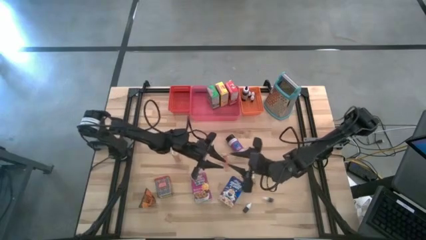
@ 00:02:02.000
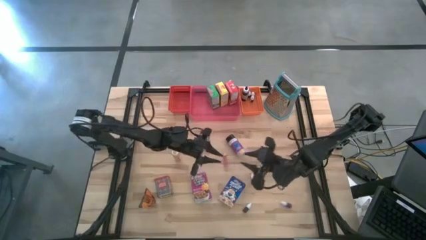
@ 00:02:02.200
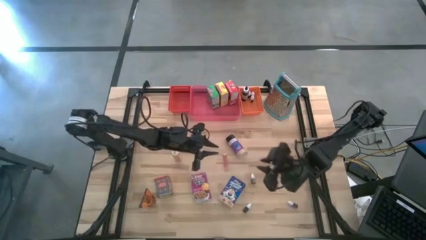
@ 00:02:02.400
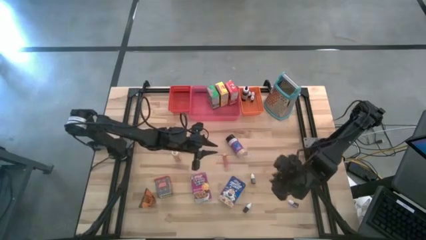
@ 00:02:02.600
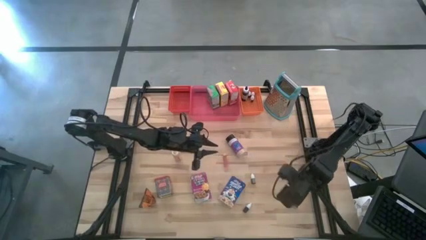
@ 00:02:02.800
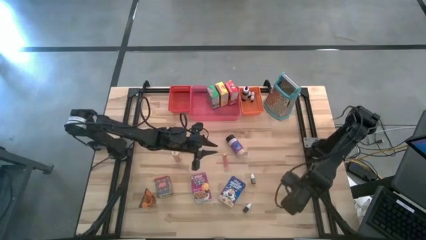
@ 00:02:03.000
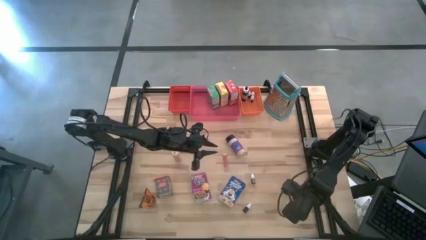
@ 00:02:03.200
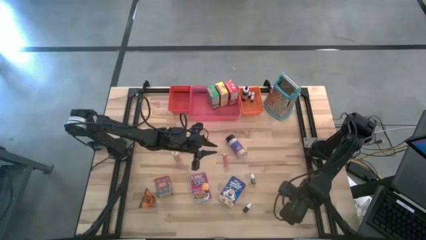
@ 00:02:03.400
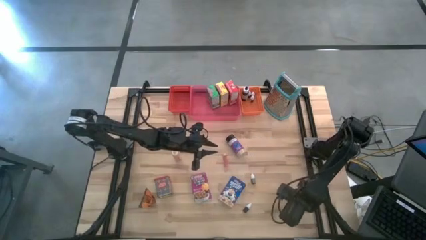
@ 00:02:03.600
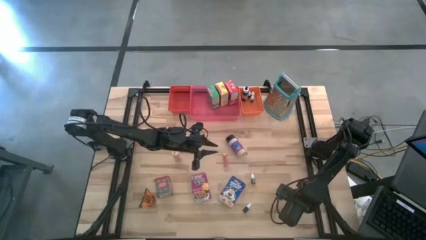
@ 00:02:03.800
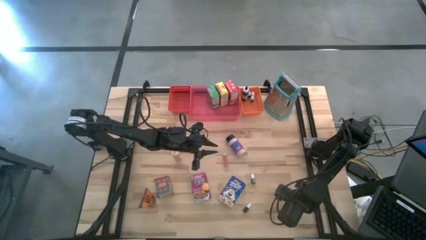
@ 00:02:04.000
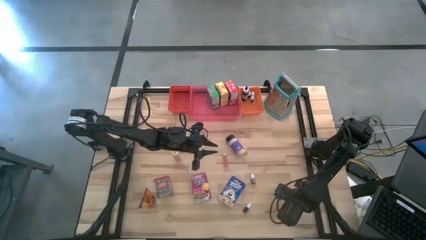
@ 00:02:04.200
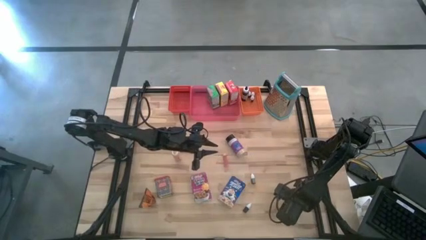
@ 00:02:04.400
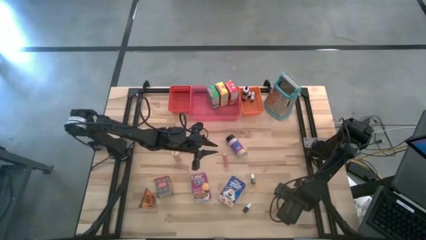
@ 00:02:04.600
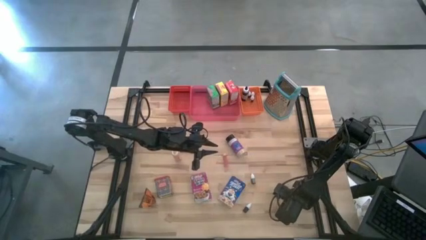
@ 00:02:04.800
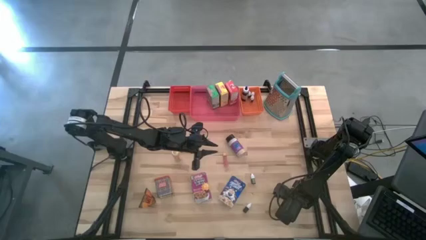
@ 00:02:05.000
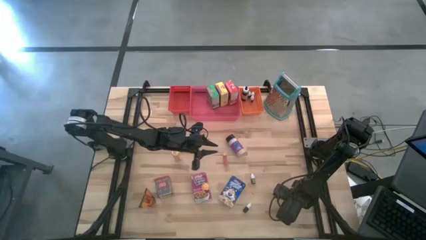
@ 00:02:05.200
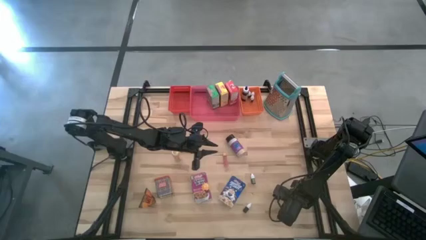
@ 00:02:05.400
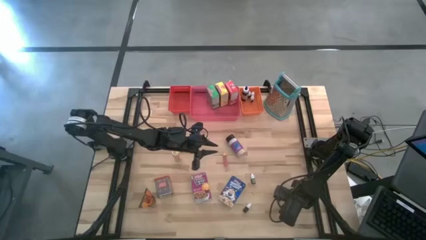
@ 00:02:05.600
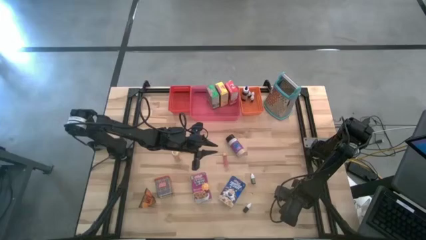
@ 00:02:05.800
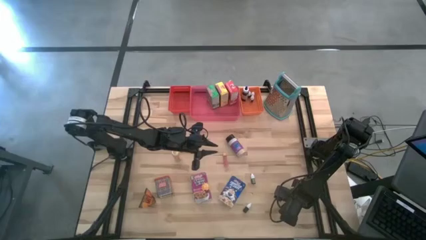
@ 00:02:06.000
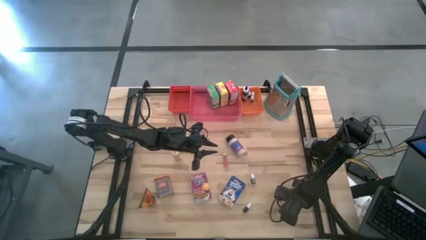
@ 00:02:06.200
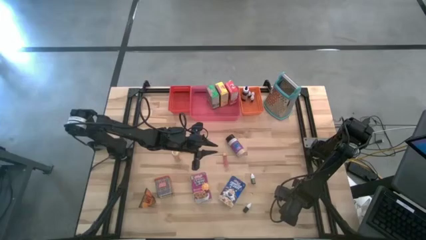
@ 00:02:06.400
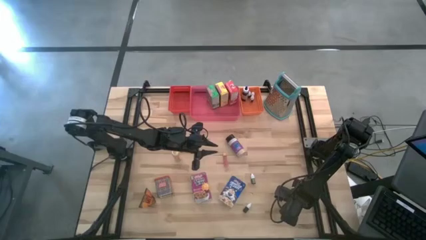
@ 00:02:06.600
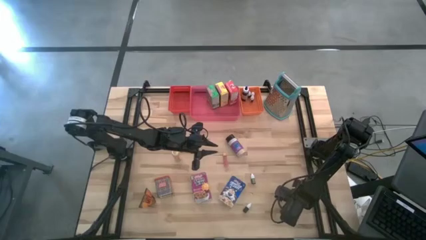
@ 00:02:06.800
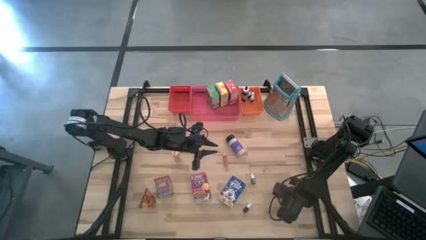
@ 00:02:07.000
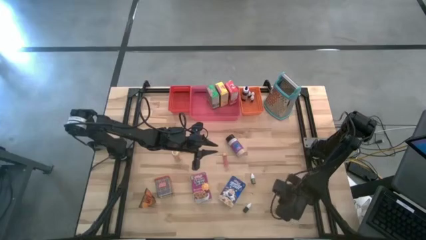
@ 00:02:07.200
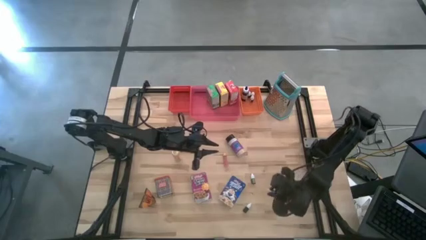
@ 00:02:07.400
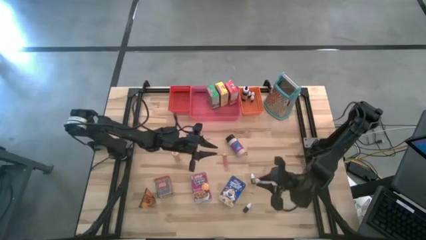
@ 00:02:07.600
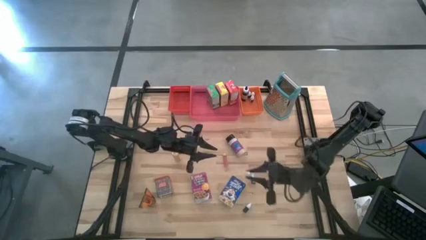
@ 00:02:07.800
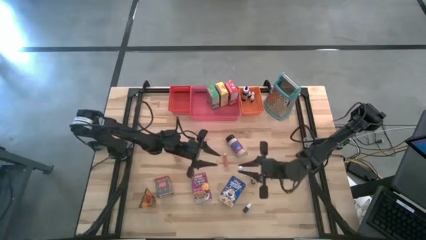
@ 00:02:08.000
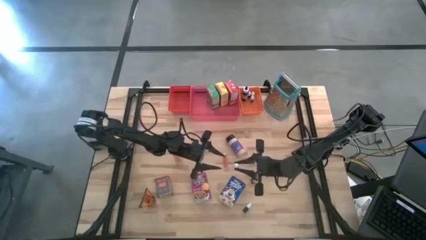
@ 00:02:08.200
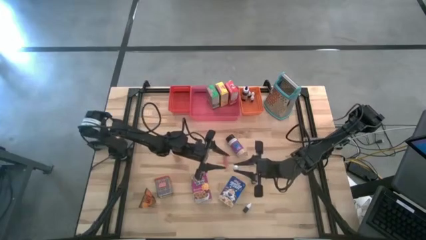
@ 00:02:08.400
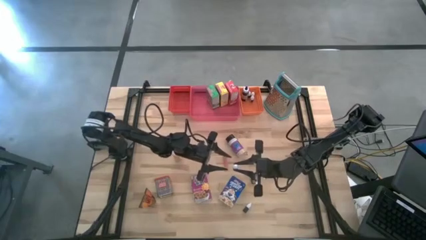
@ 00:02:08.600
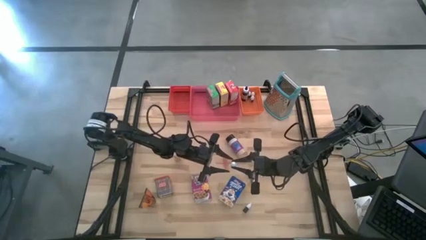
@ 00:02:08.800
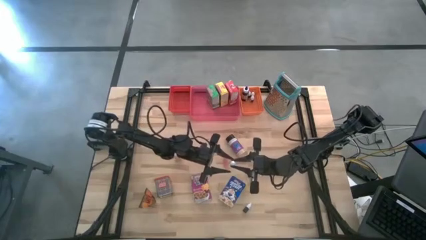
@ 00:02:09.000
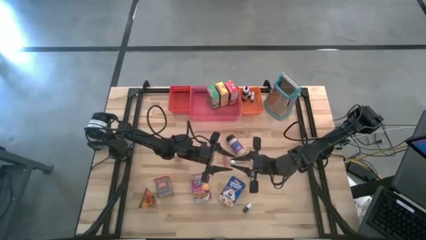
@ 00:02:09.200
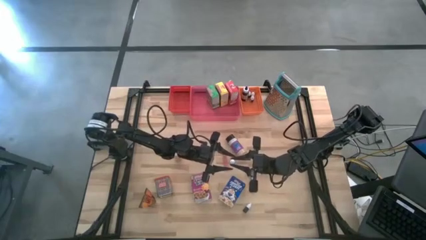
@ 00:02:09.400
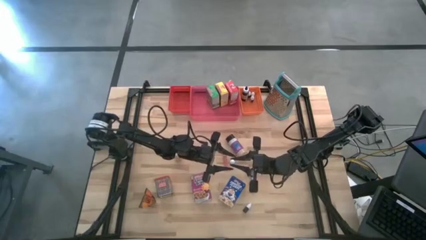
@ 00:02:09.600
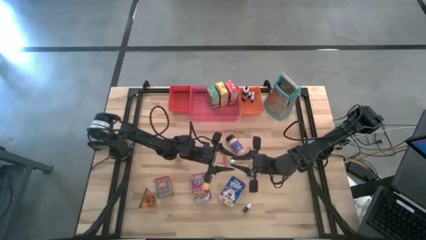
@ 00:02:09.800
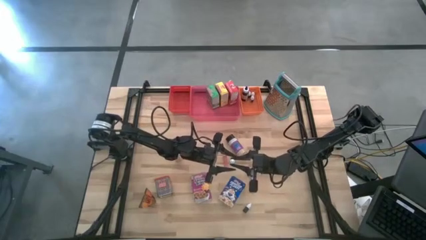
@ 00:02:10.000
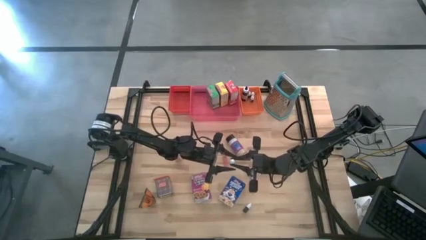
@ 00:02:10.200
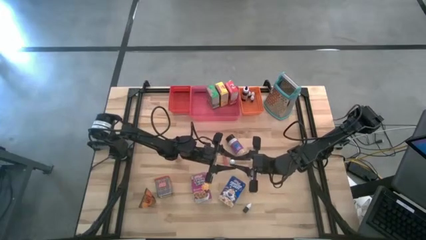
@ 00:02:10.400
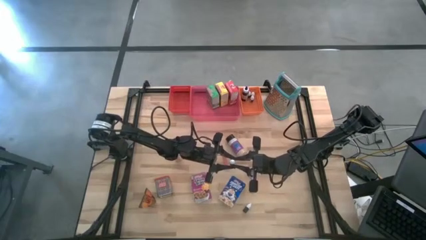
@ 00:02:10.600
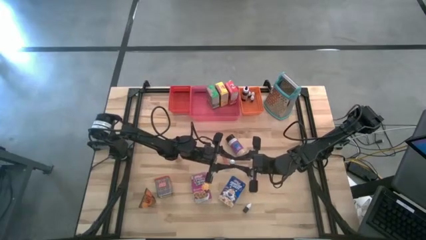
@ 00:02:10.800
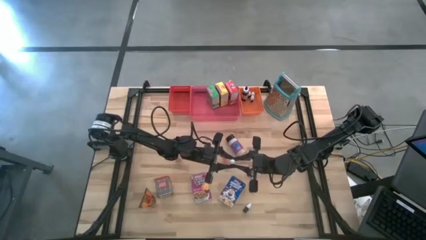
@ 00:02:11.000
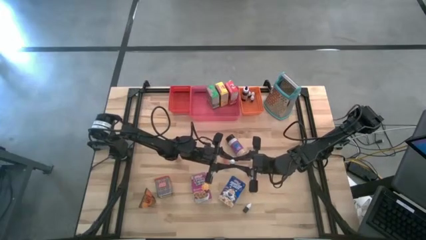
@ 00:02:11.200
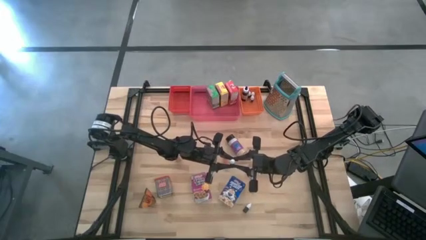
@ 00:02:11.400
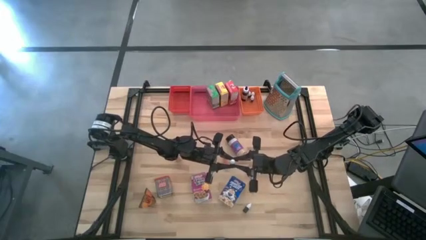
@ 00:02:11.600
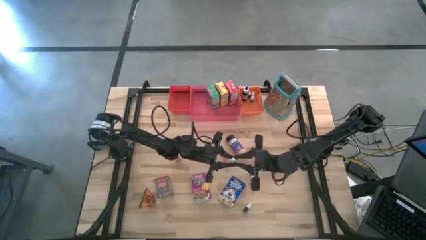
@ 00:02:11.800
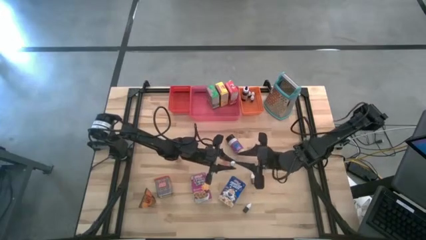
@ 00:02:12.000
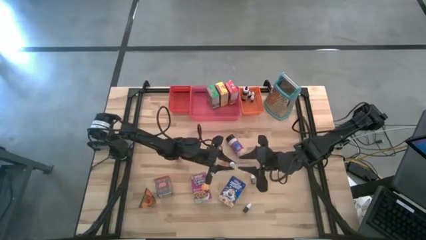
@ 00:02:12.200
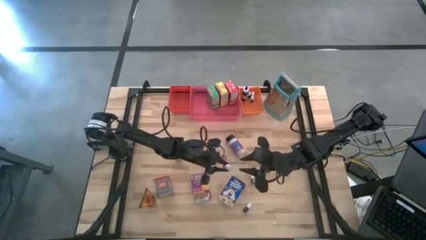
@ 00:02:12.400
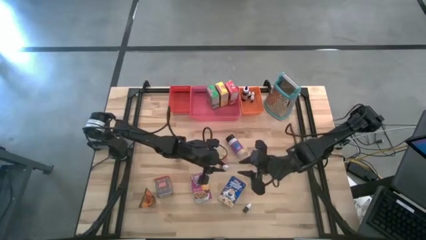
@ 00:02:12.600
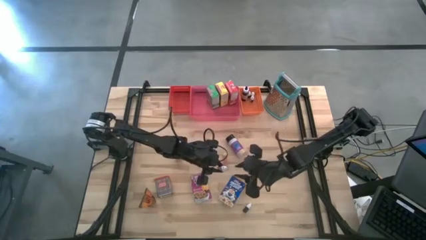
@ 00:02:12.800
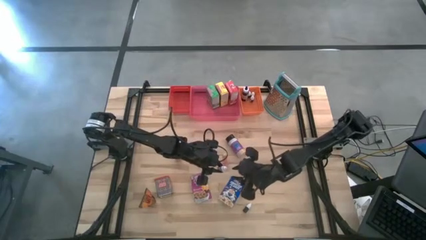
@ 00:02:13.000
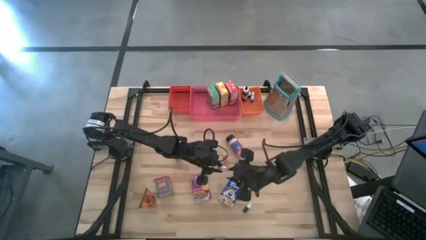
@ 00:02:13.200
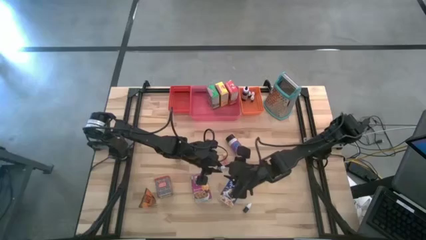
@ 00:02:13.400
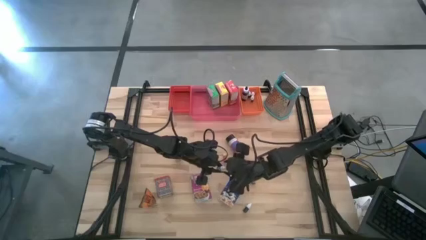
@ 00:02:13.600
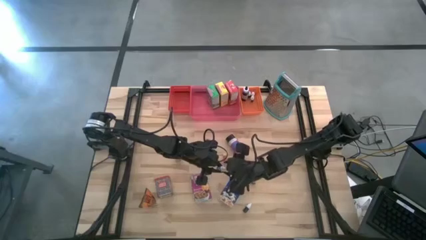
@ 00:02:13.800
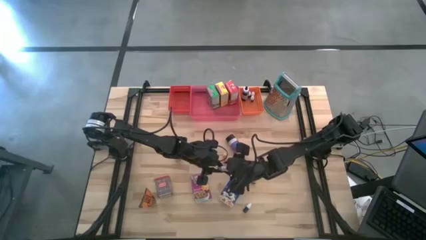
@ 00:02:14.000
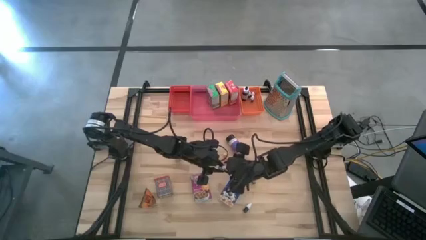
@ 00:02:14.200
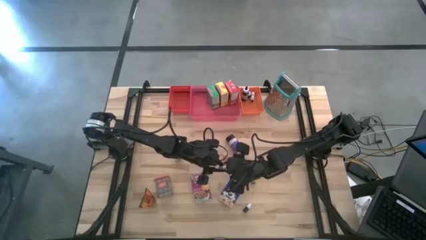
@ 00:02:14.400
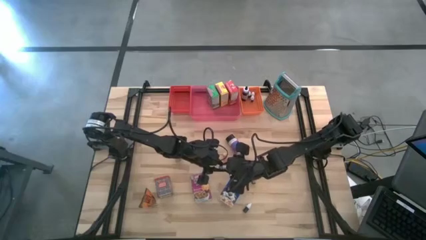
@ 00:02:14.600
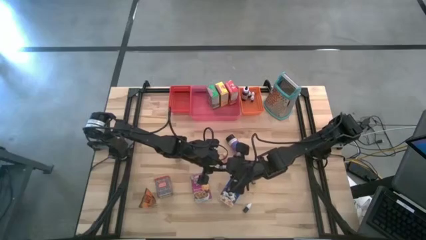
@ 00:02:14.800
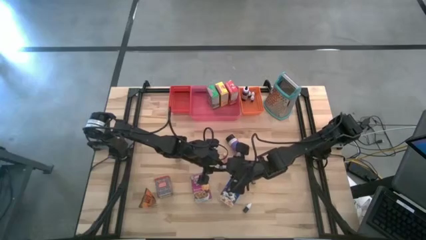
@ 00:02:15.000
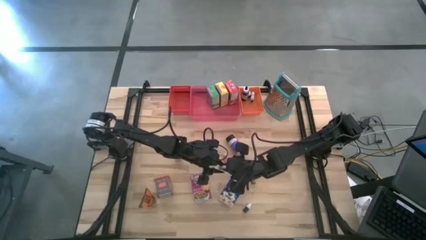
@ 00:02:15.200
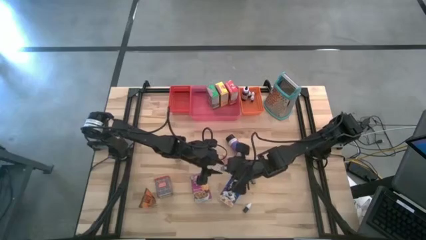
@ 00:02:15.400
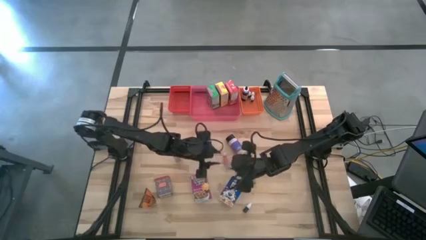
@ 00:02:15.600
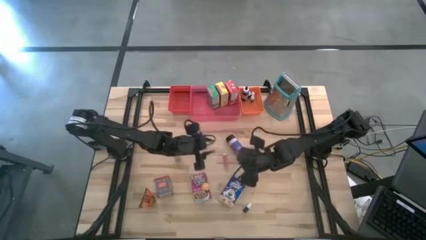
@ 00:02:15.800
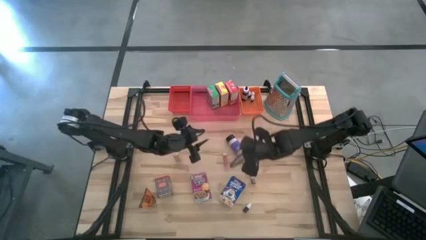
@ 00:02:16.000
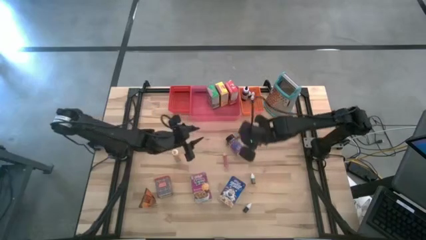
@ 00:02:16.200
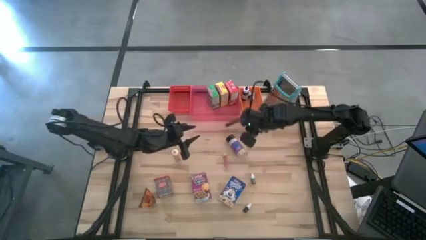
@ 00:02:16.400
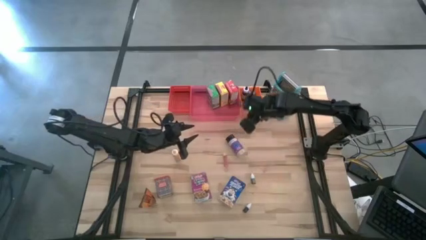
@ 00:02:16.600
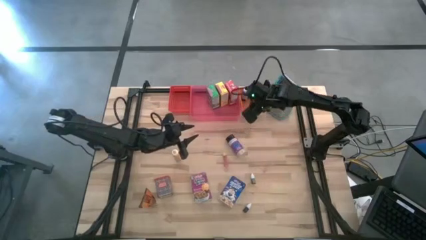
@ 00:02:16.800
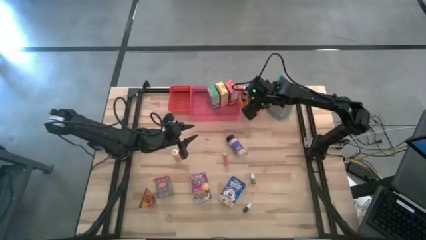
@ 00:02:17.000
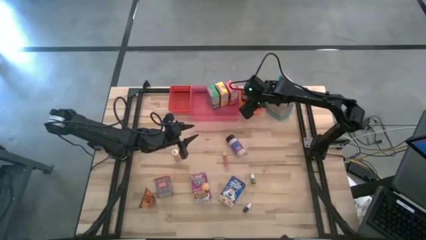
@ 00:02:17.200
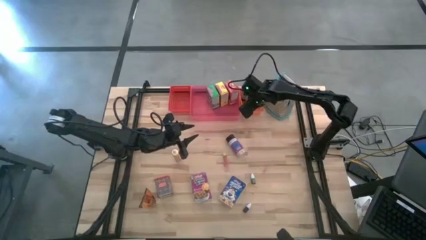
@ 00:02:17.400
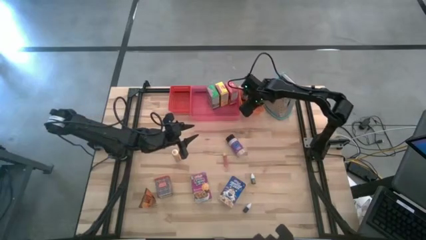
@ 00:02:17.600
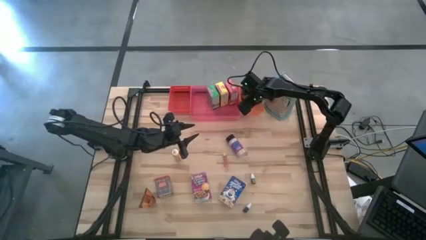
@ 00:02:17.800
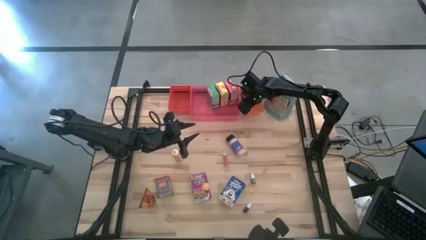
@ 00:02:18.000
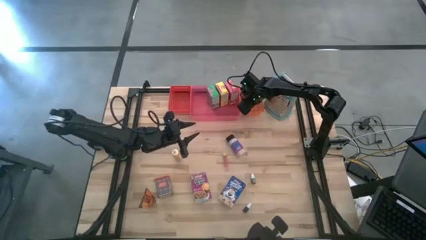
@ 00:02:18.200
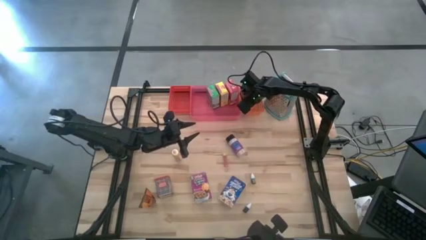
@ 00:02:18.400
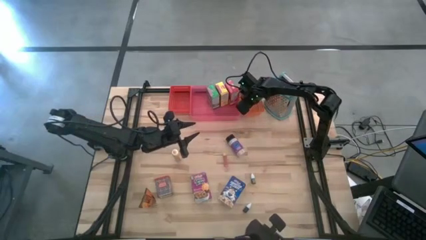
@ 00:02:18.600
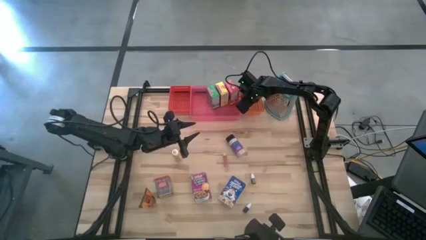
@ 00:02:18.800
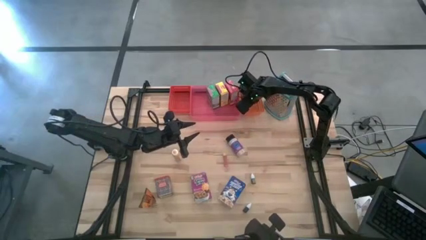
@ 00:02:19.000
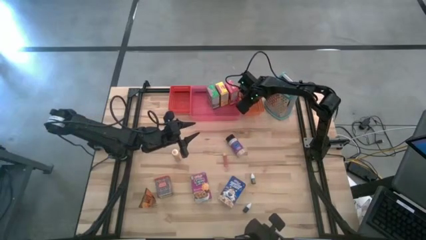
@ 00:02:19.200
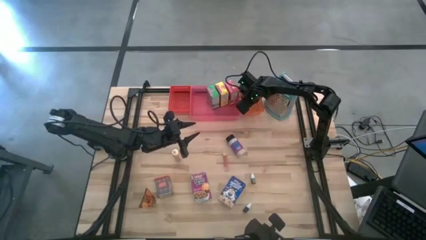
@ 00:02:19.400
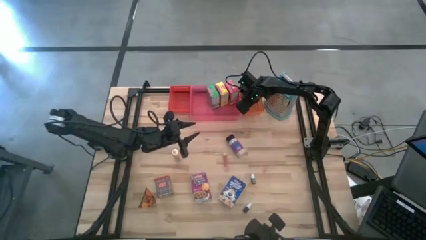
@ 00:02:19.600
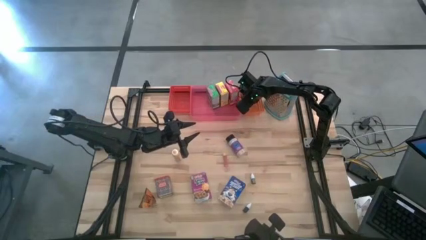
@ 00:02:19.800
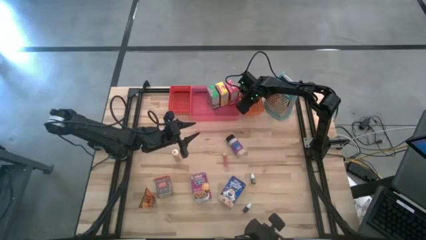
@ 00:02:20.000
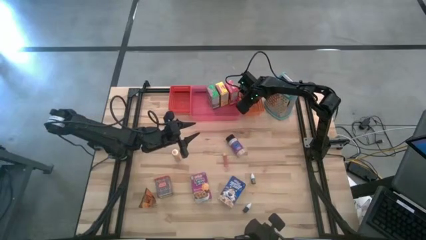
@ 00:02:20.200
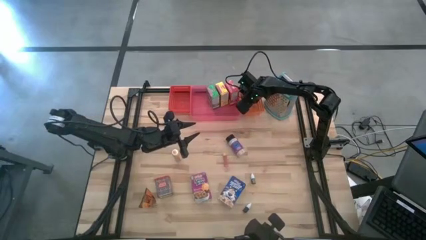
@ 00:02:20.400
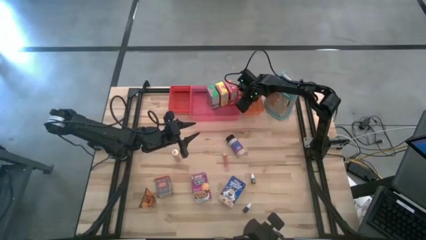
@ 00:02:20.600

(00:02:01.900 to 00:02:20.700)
Task: Pick & Place Kitchen Items
Put the purple food coloring bottle into the orange bin
